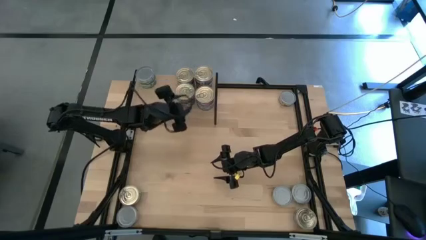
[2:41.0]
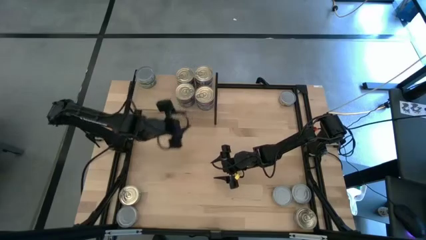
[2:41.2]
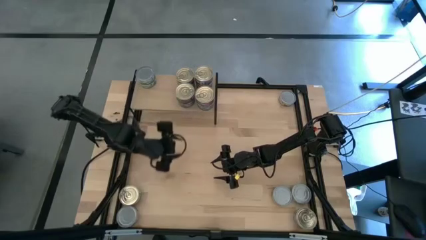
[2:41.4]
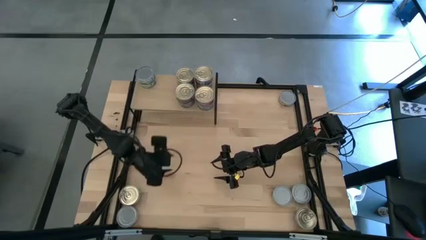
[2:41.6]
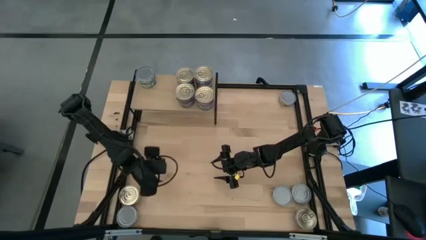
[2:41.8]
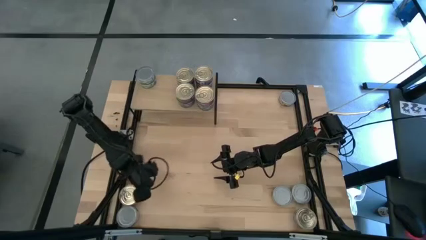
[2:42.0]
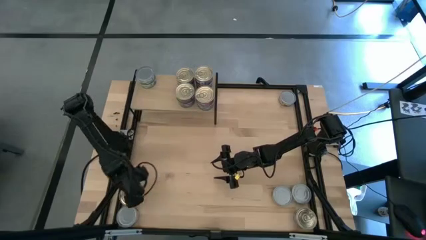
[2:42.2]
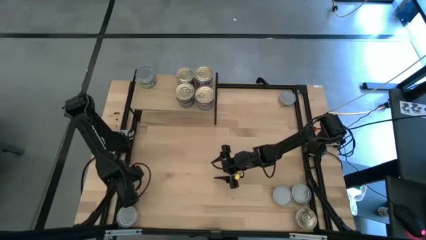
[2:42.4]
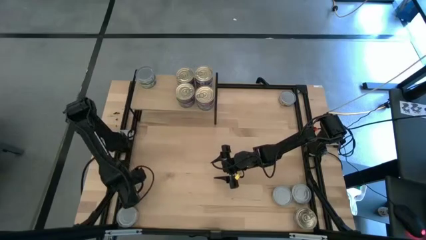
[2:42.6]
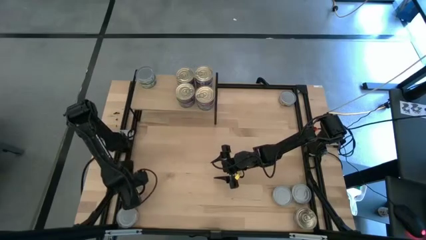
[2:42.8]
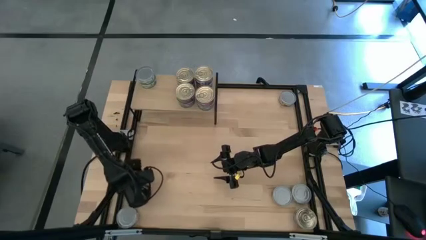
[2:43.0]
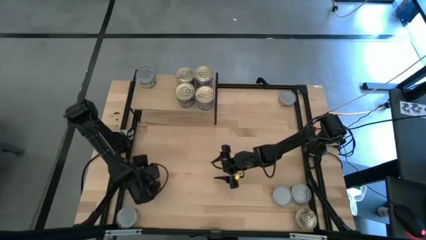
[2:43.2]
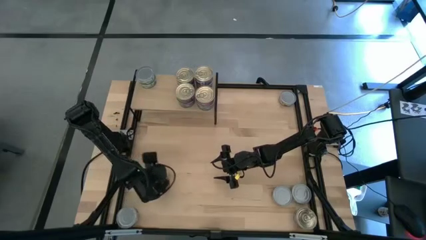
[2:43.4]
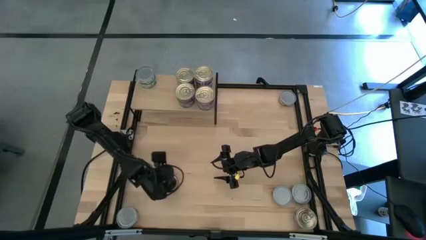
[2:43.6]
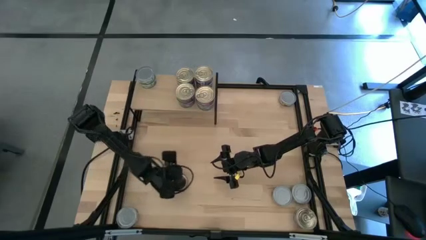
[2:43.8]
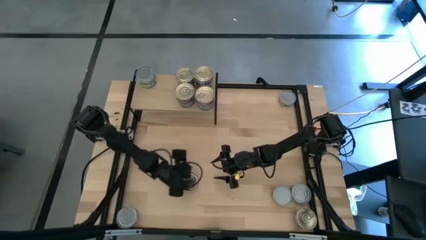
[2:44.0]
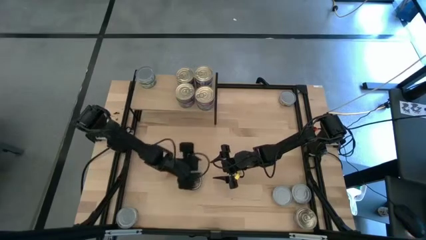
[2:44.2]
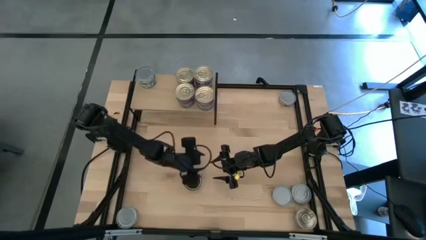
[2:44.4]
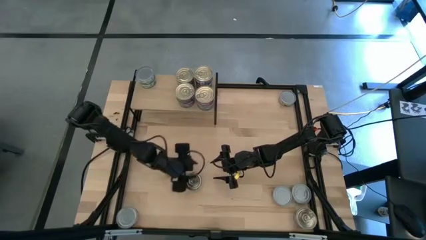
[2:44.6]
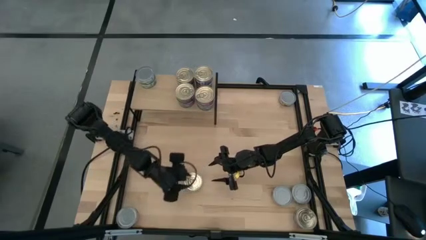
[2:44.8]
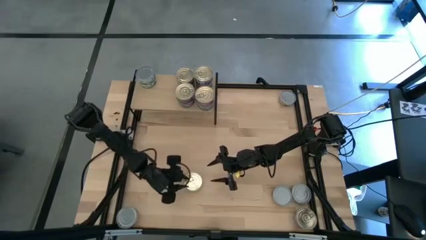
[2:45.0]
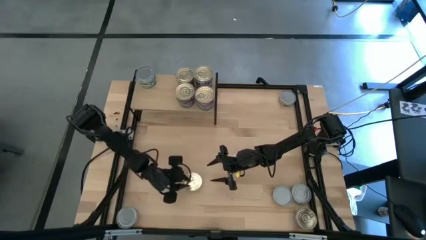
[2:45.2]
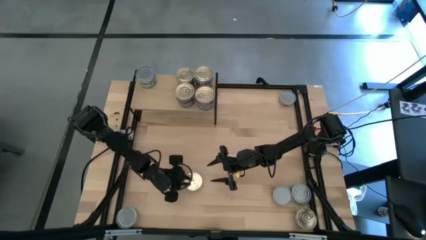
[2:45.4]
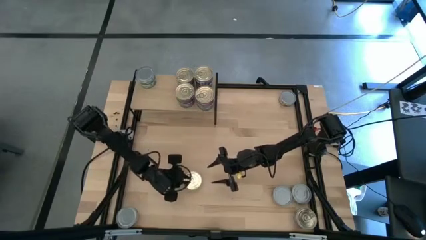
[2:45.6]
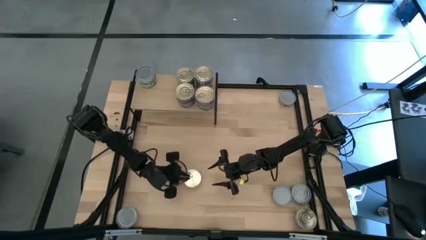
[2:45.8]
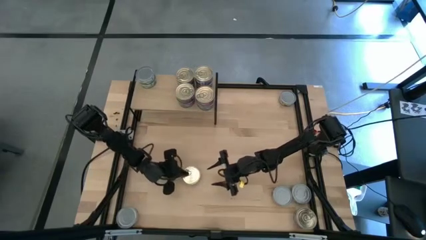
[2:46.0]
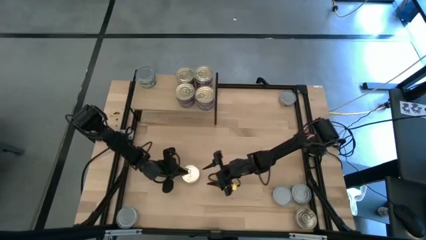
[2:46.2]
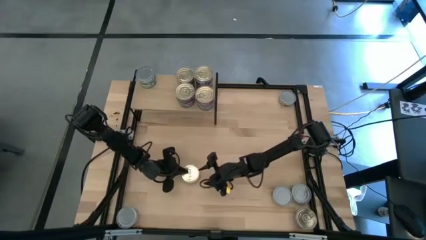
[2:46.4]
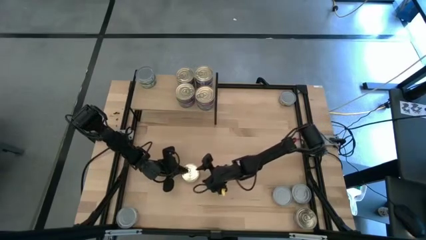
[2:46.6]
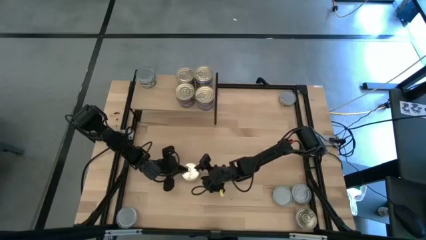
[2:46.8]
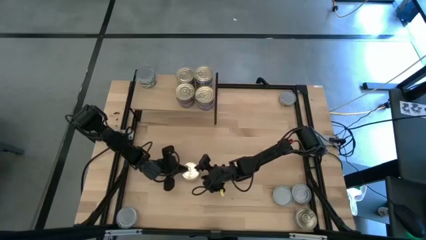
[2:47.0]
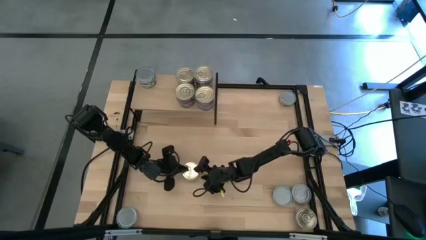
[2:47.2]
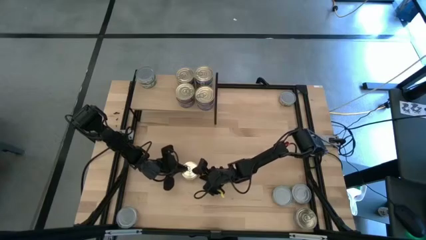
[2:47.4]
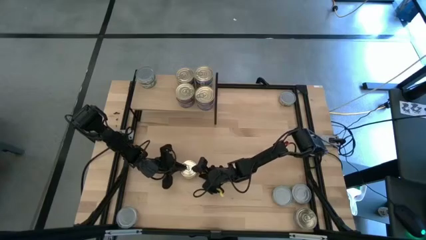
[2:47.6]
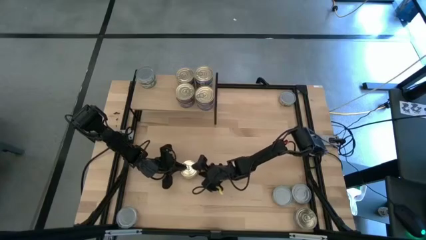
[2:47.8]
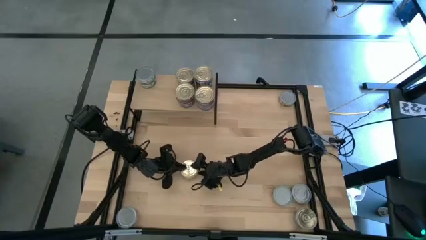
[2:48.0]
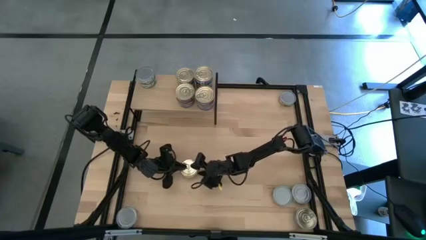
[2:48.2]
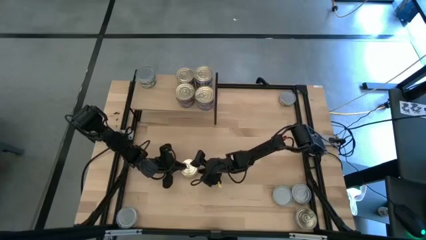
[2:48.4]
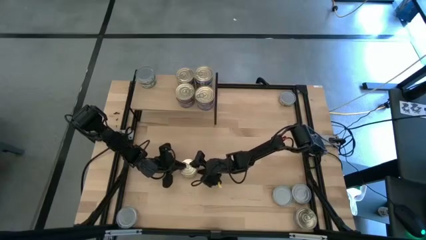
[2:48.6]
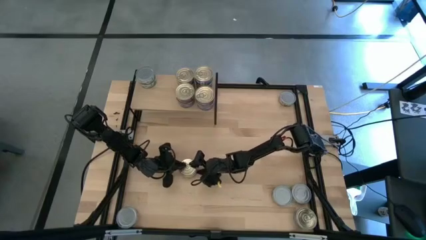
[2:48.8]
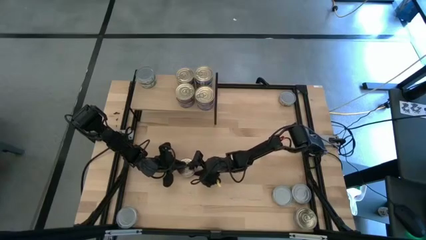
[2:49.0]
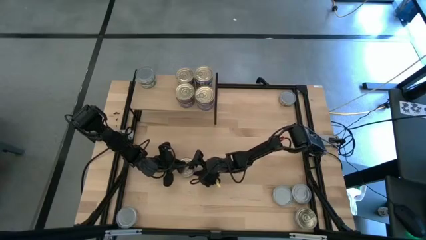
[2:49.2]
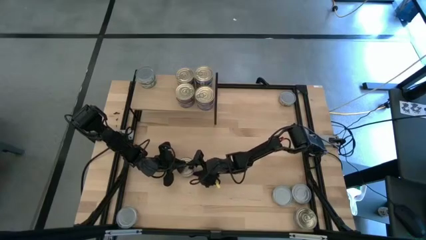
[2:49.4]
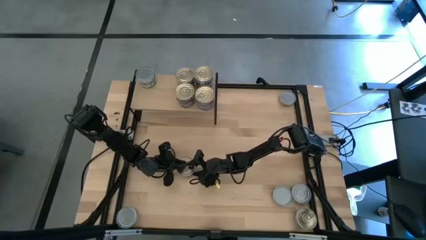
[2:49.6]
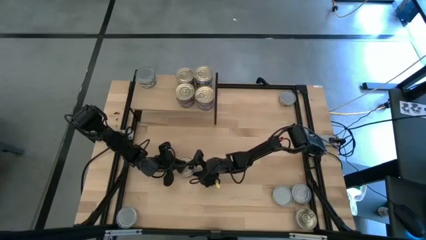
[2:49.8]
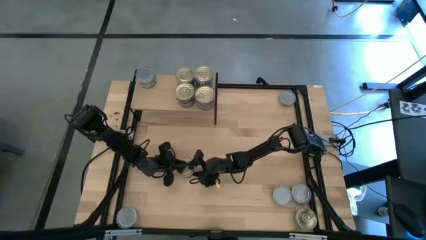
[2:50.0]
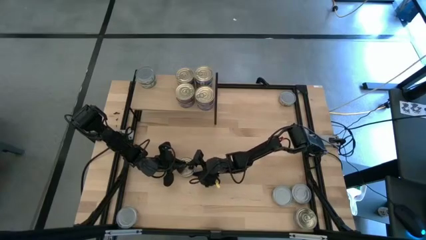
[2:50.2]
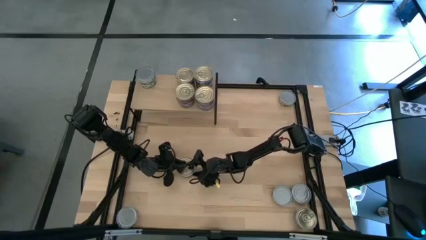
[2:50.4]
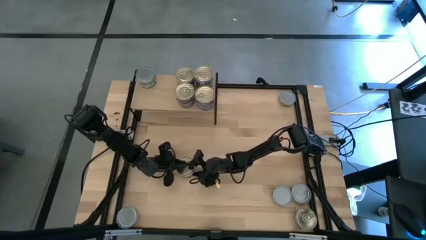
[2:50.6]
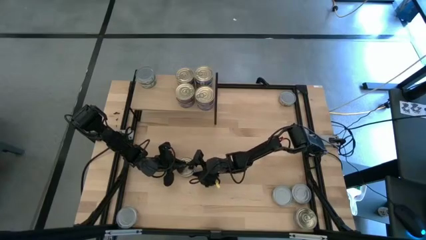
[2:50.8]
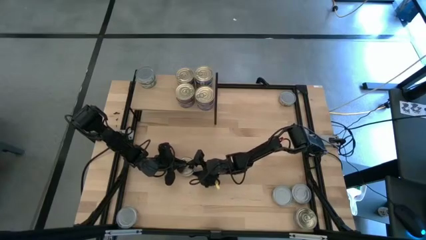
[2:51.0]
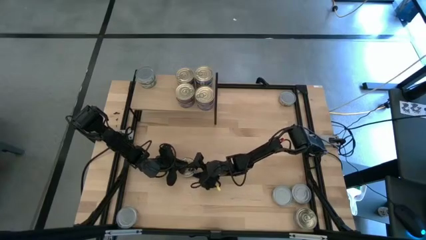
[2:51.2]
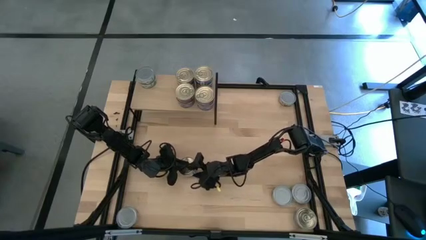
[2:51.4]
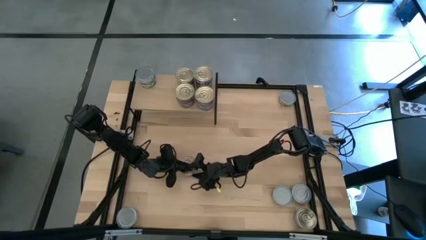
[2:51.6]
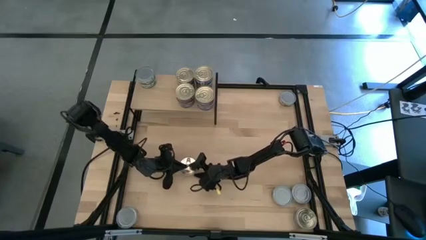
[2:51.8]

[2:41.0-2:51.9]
Task: Stack canned seafood by type on shelf
Put the blue tuna can on the shelf

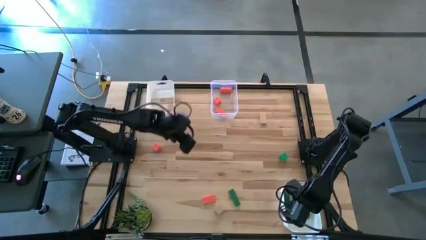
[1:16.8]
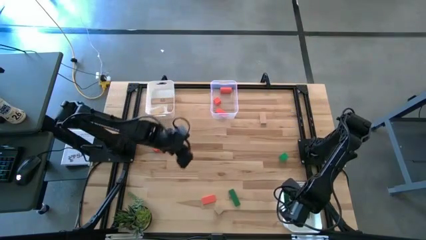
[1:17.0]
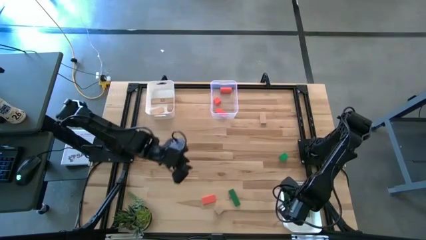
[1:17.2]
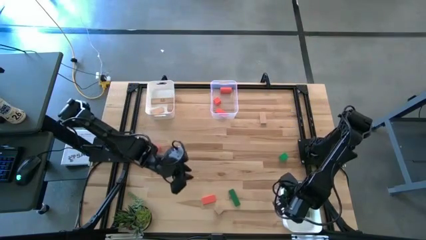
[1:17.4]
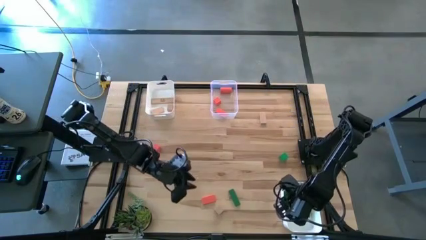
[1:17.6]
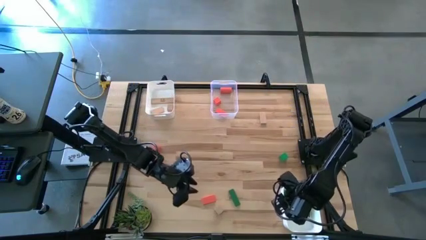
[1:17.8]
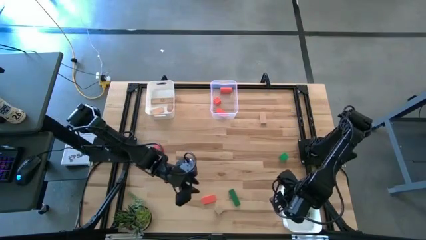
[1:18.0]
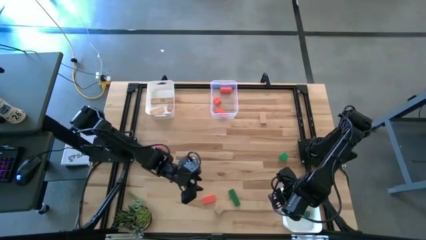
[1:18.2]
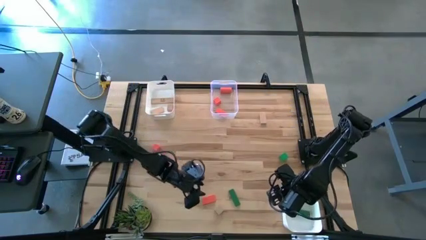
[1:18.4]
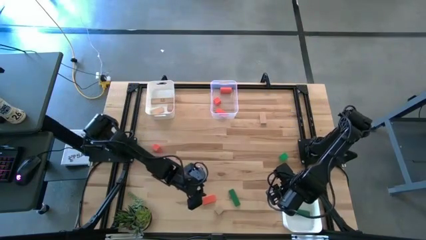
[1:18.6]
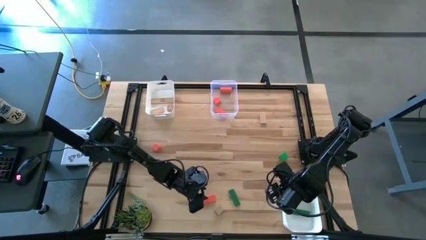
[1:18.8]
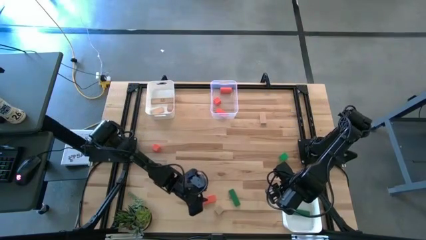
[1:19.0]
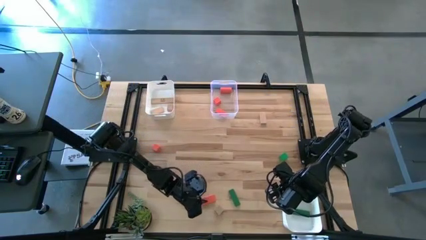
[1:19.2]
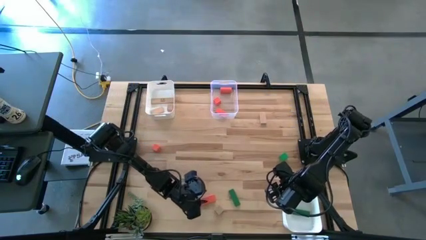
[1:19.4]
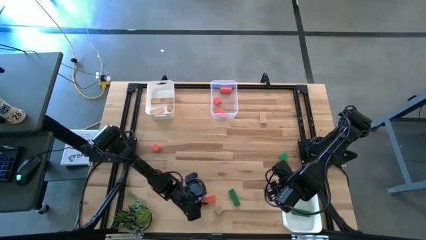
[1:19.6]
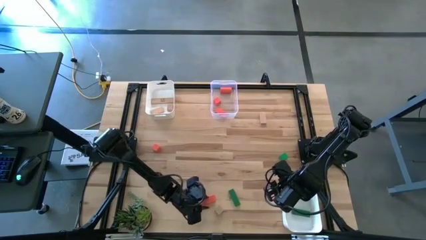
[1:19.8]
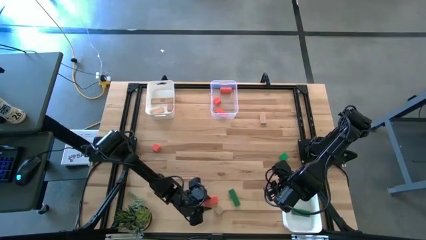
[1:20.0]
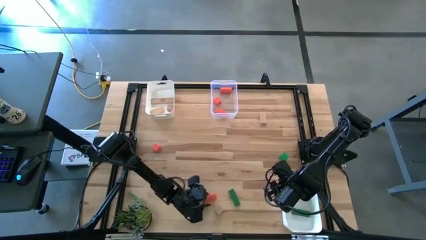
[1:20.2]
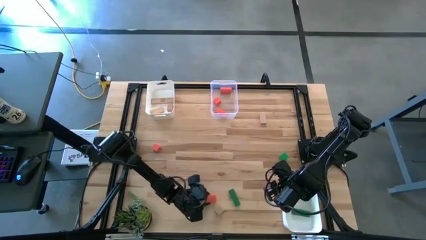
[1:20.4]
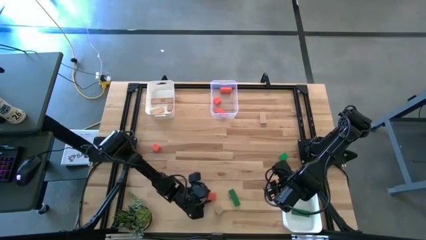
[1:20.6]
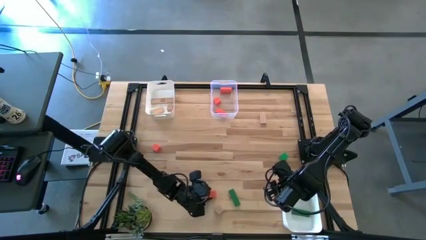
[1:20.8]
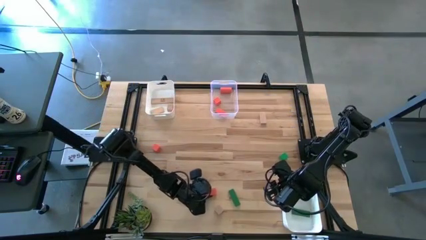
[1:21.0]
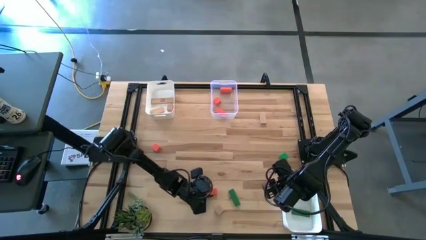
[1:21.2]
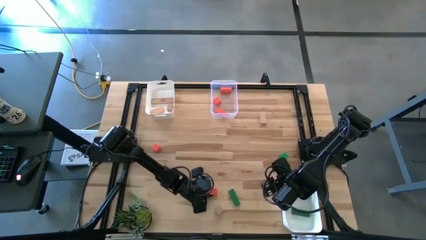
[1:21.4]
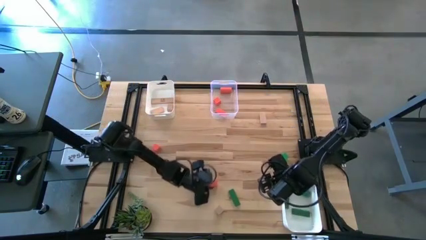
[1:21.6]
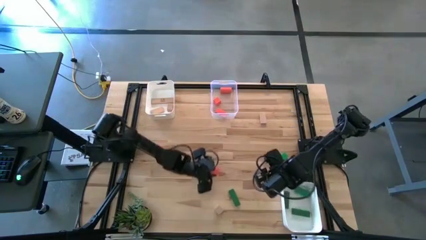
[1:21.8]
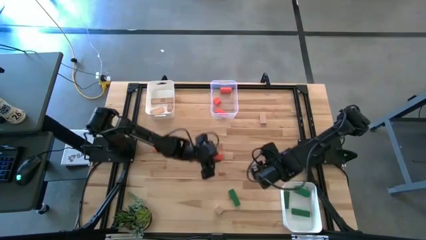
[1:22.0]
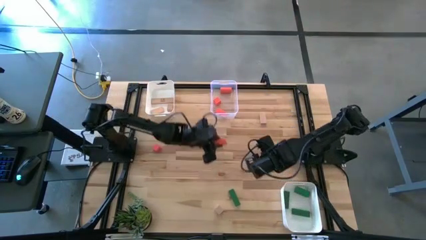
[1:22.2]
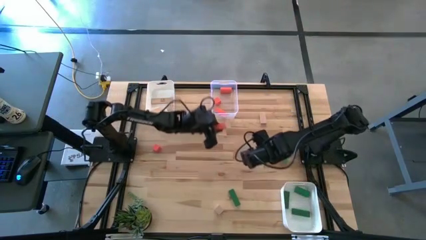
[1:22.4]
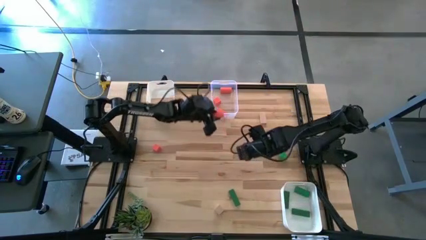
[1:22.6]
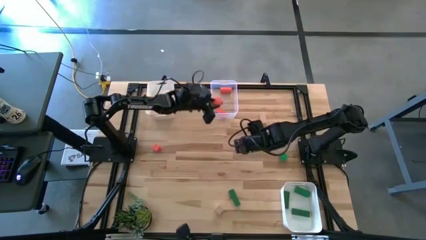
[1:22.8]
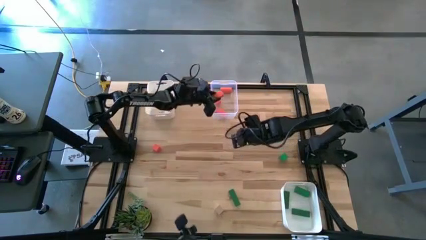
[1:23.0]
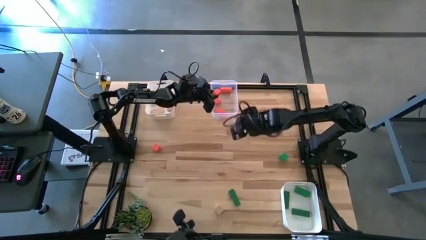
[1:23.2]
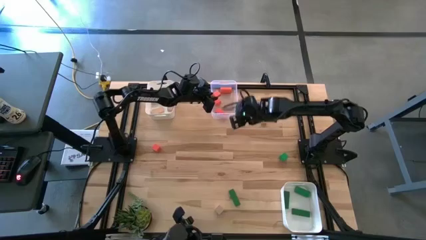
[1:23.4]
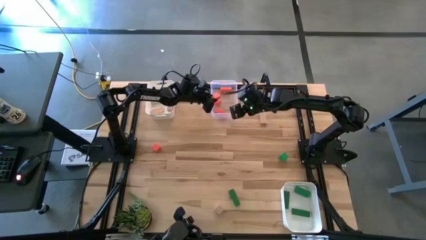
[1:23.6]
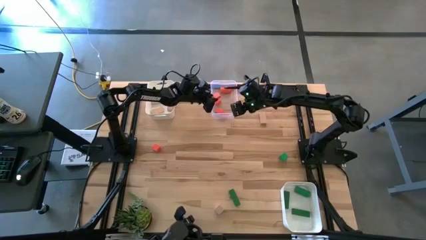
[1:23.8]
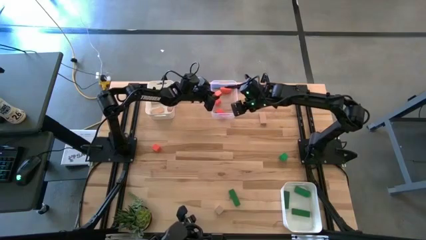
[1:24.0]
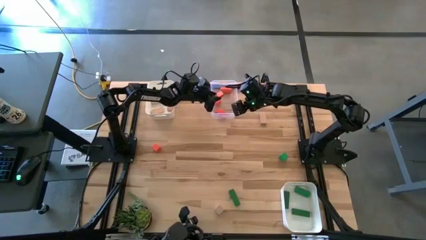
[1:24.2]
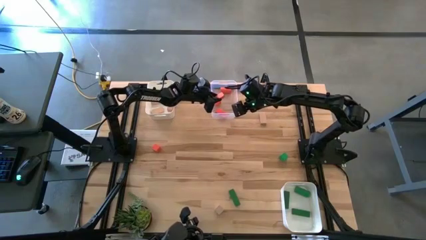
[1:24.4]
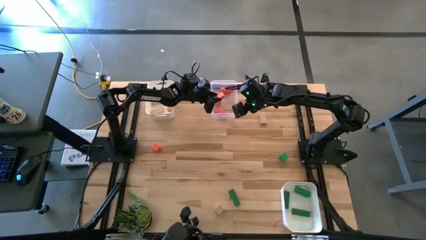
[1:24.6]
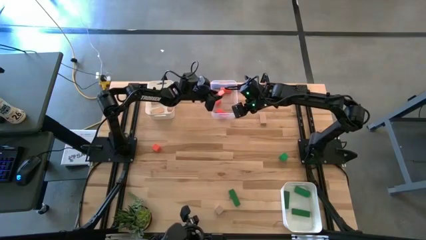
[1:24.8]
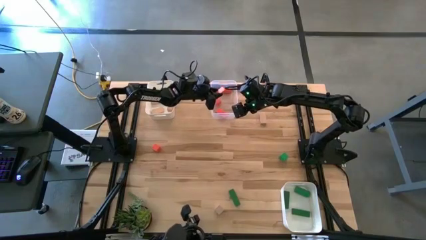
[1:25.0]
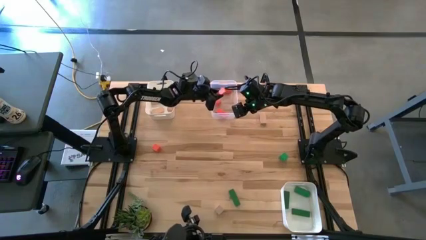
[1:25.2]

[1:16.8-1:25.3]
Task: Sort & place blocks by color
Put the orange block into the transparent bin
